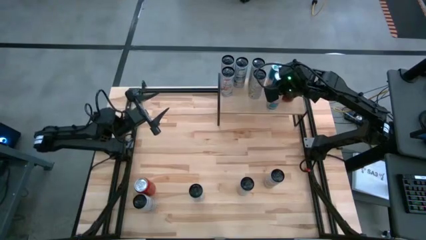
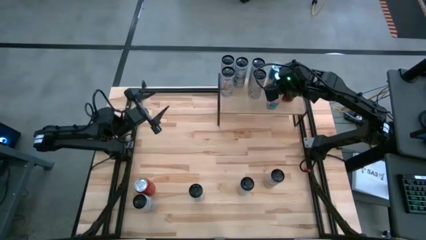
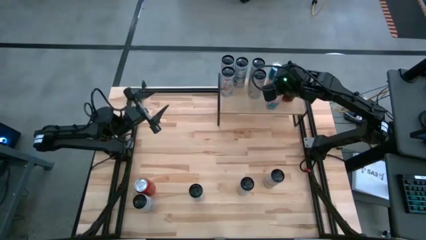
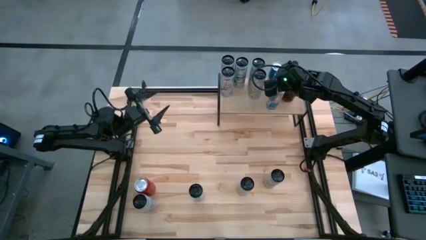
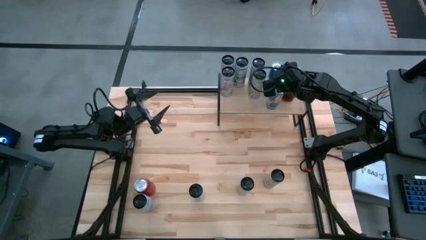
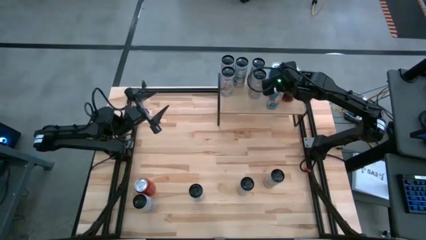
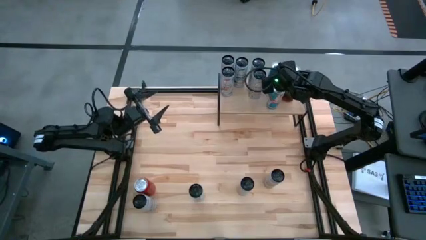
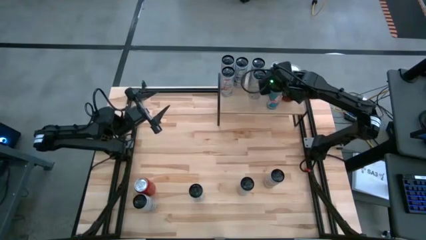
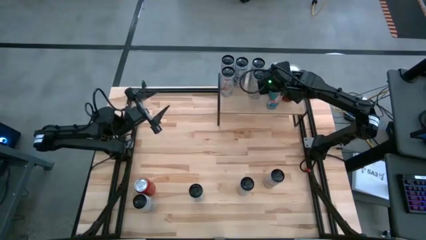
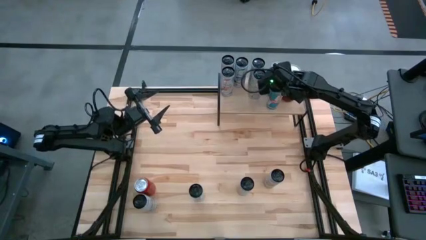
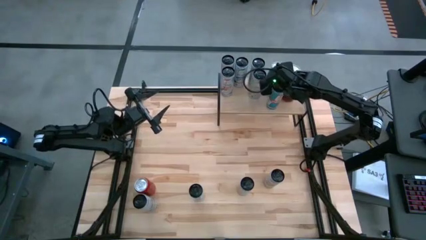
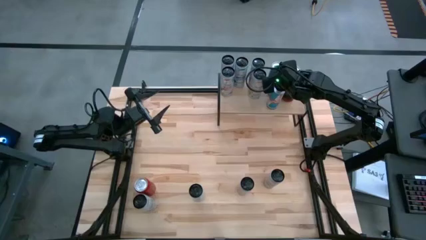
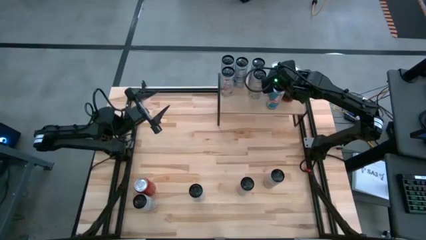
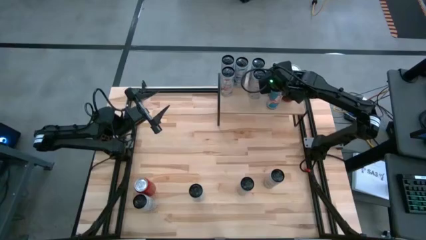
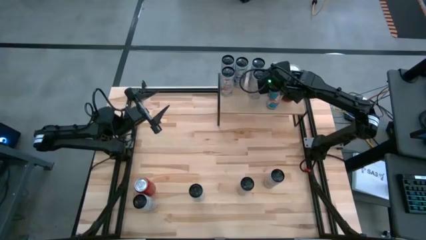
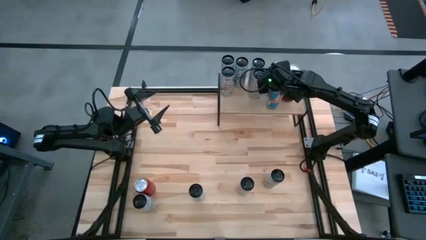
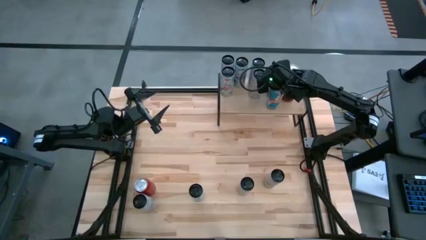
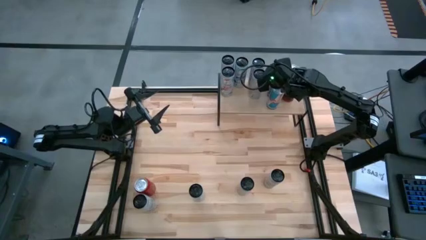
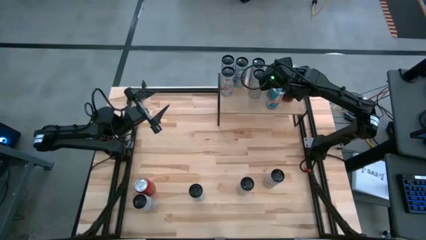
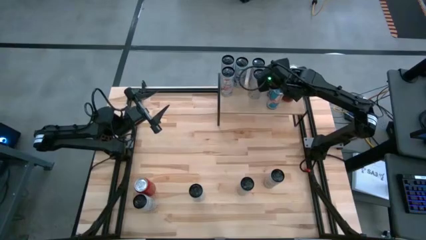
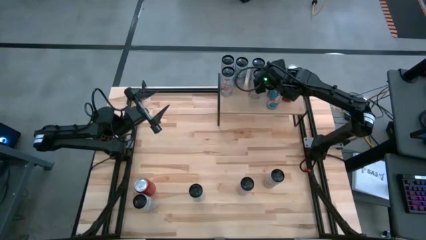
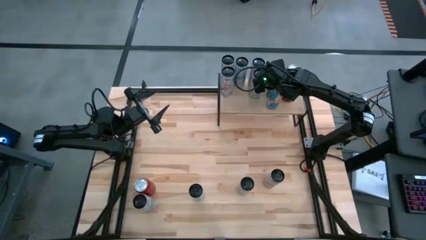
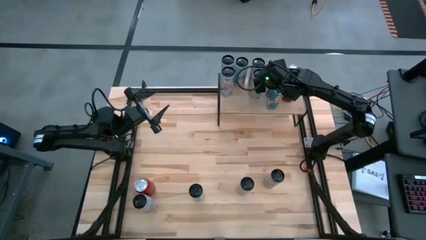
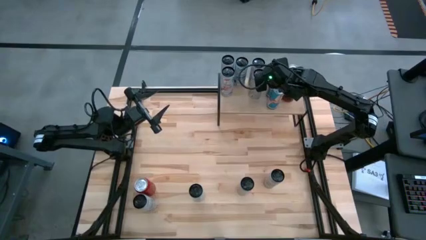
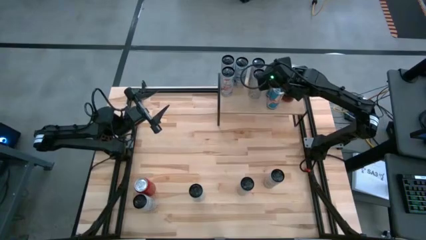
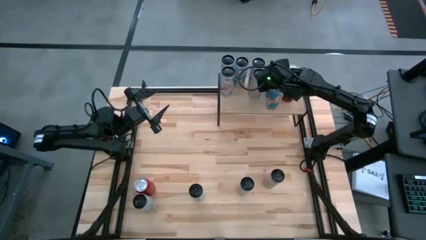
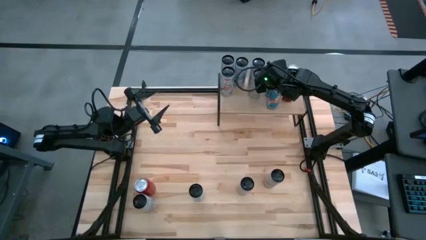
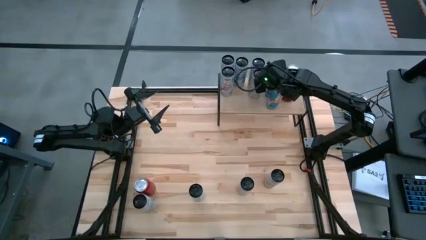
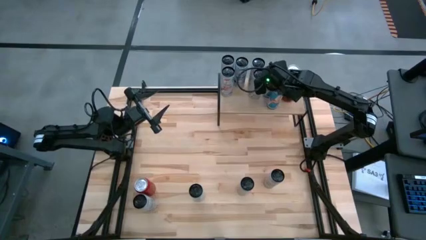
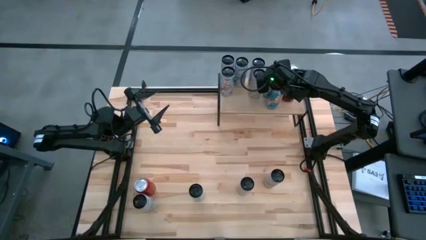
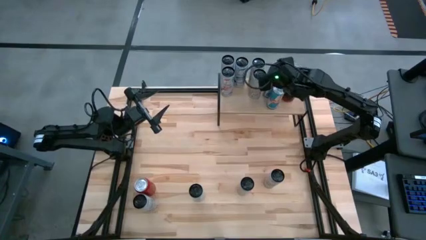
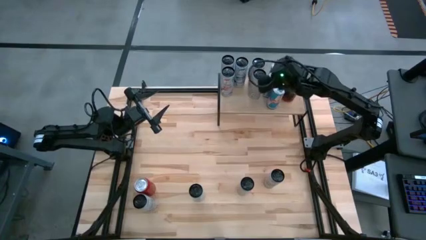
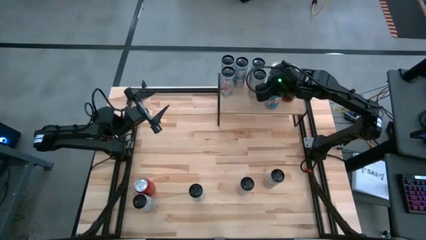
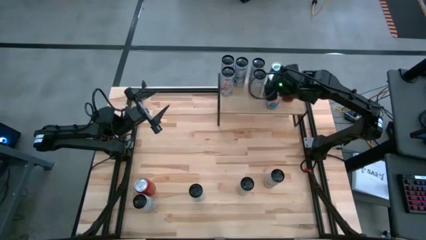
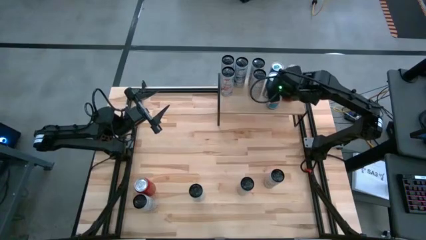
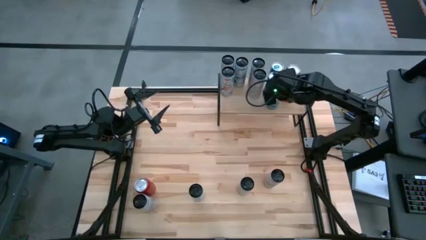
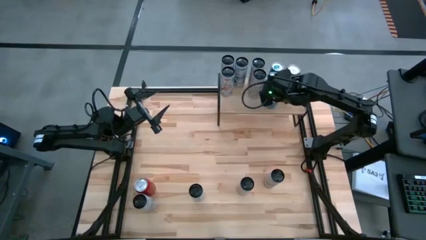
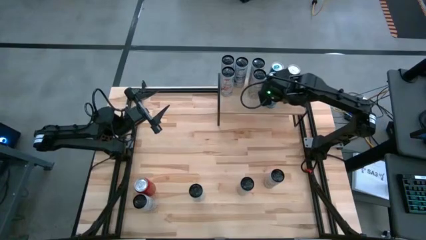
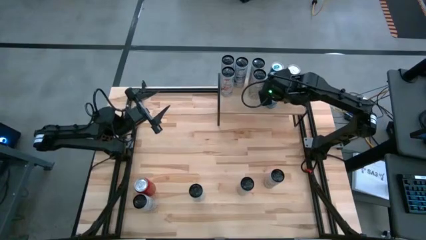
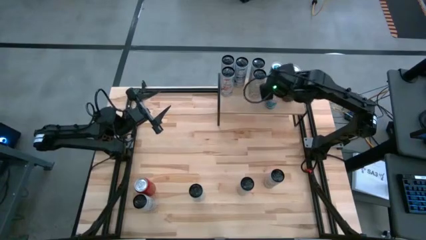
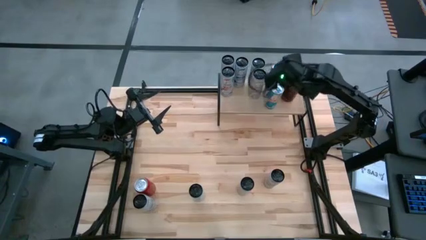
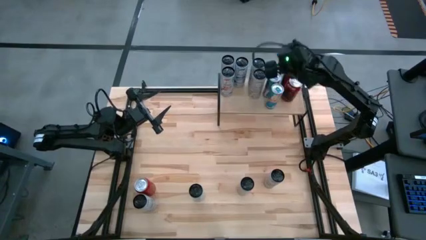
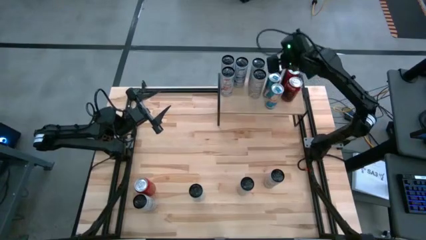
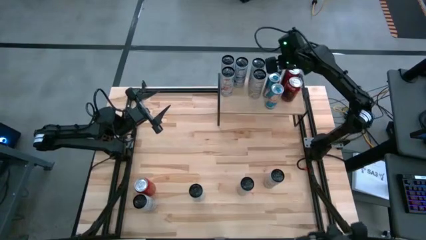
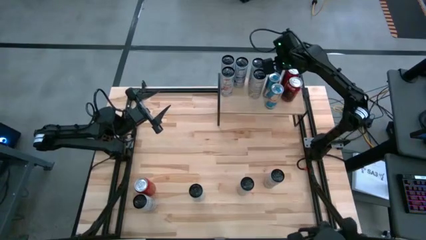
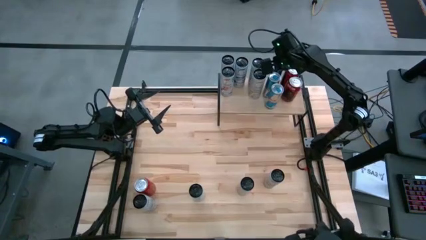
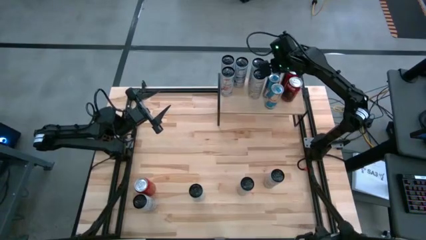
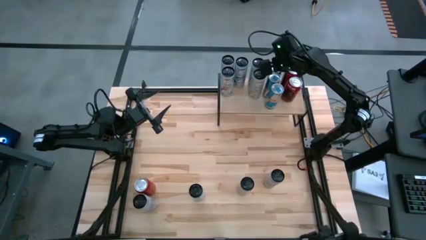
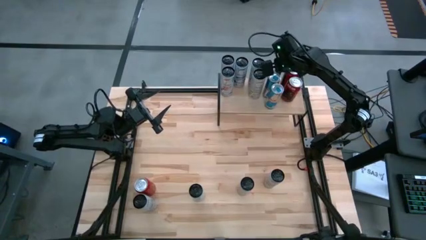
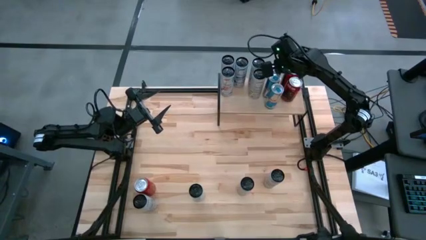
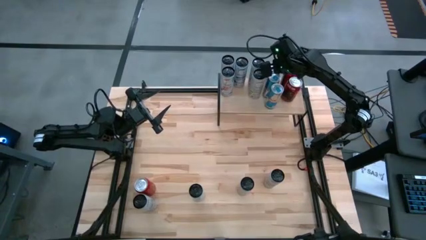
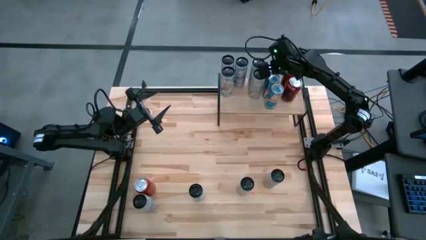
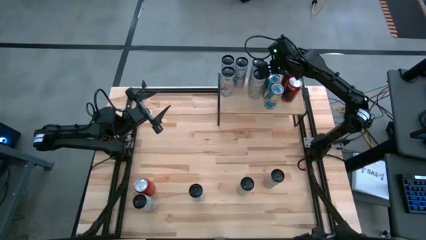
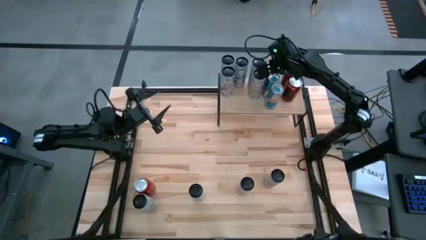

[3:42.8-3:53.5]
Task: Place canned beverage on shelf
Adjust the blue soda cans on the shelf

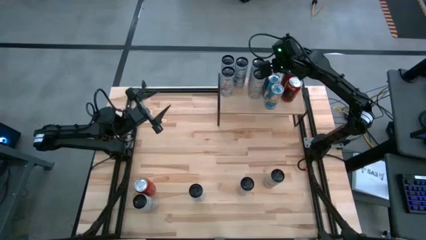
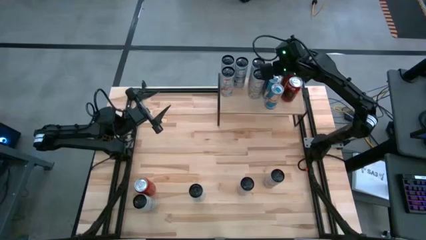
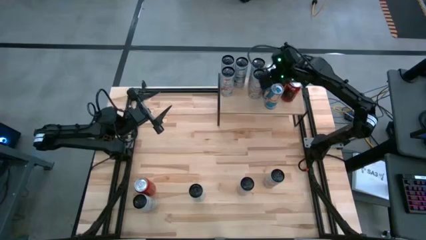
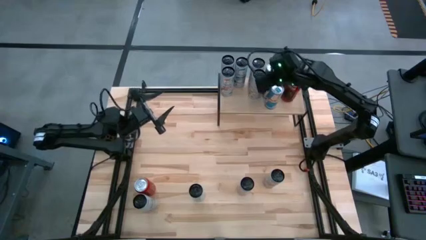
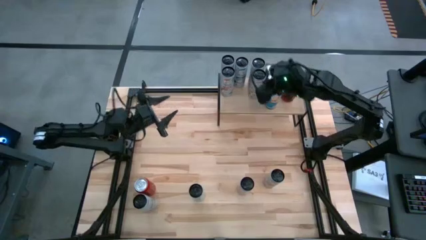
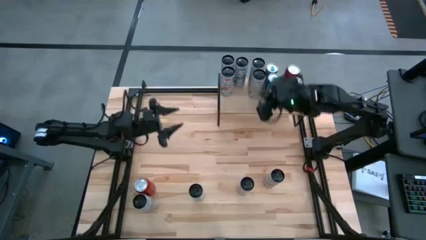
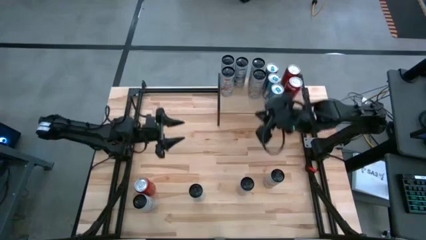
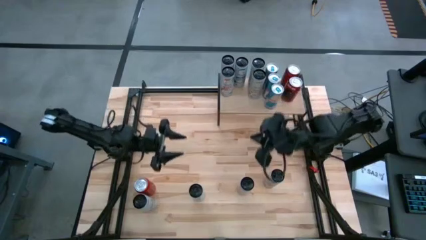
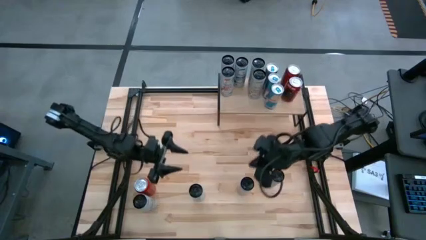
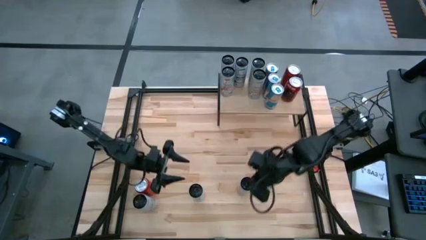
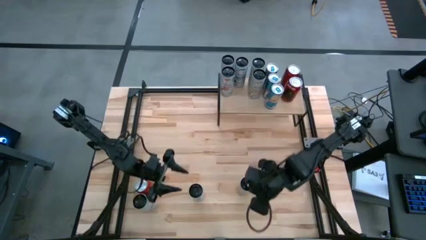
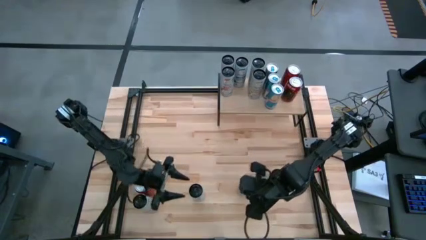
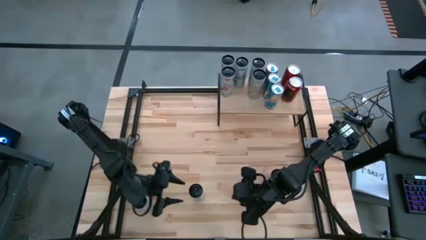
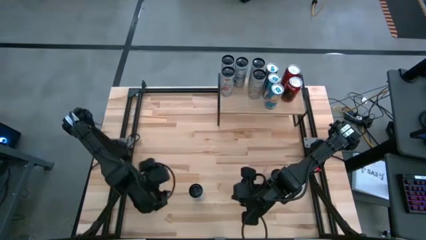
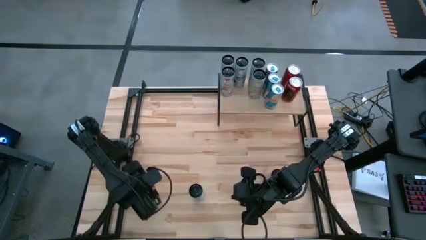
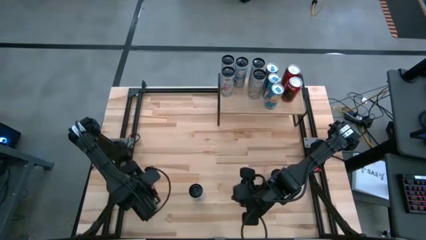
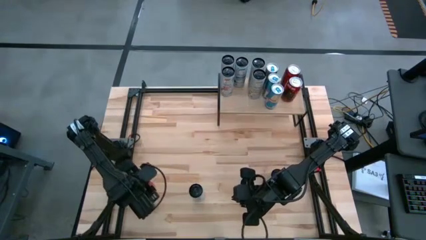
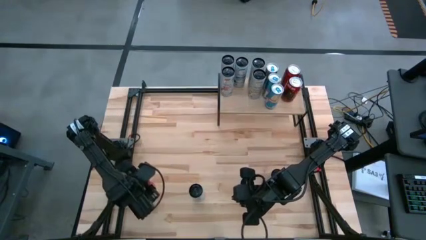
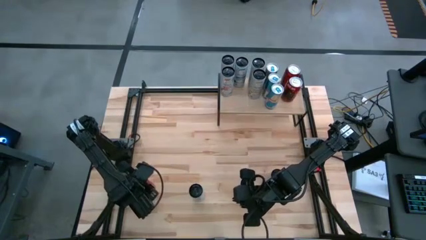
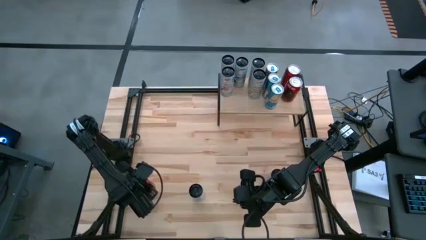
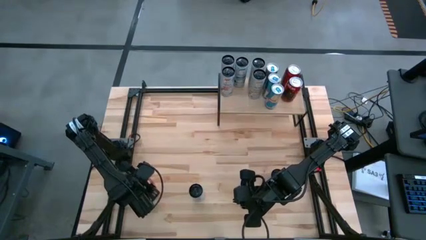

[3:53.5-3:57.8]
Put the red black soda can on the shelf aligned with the red white soda cans

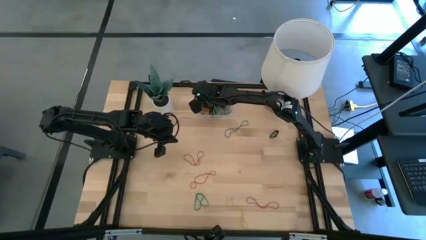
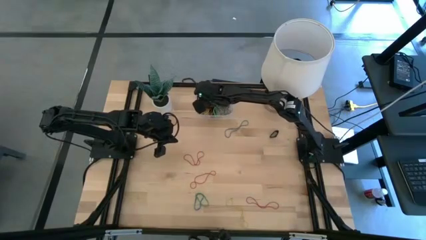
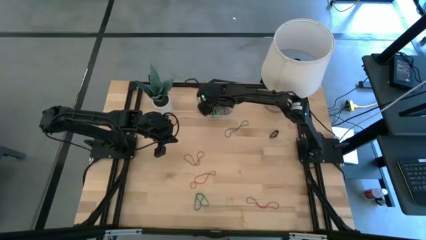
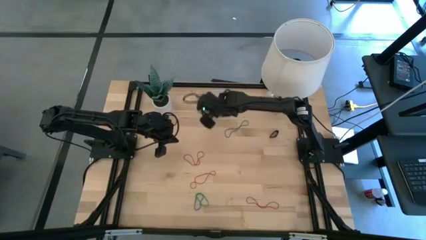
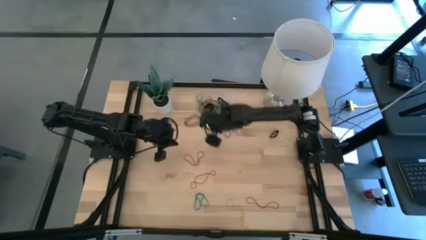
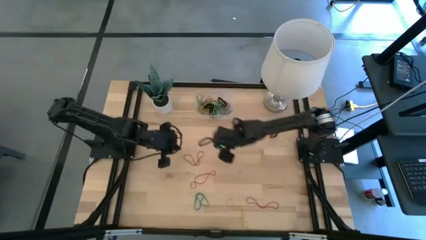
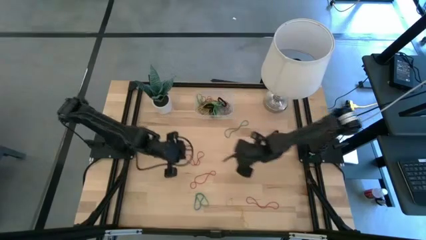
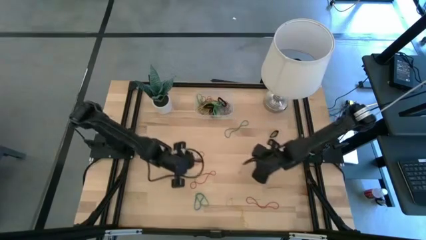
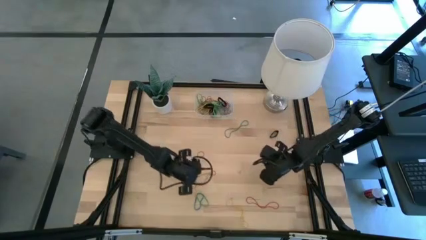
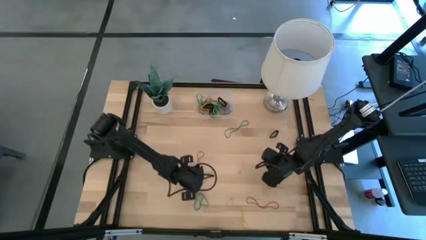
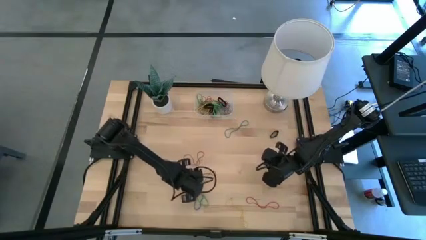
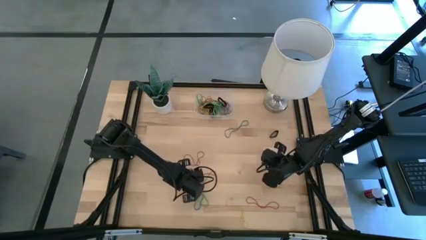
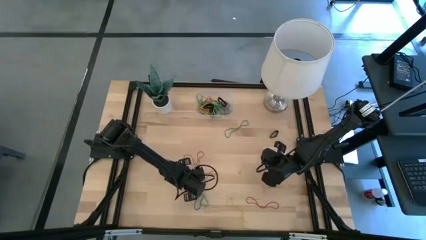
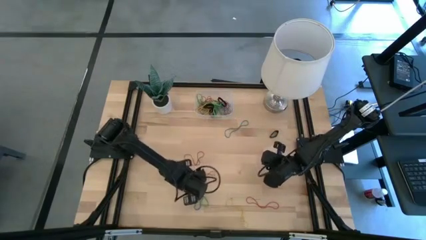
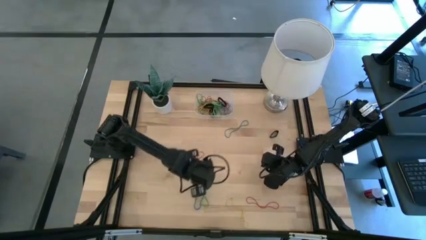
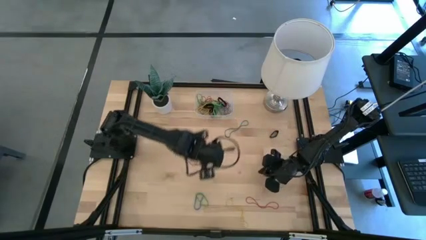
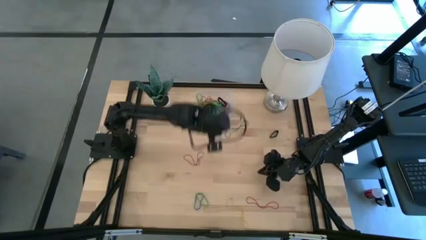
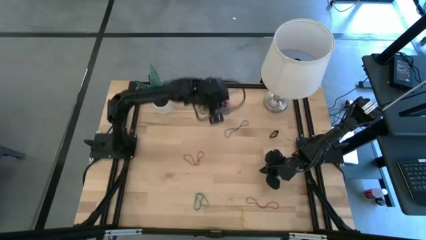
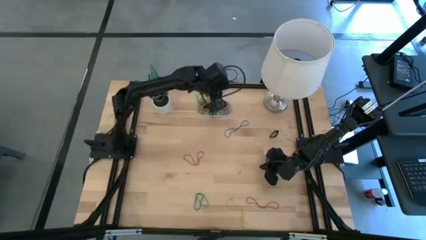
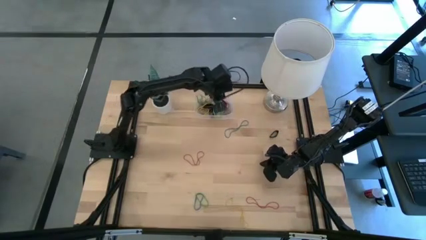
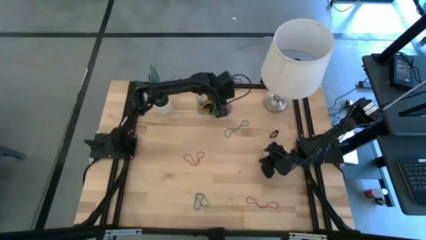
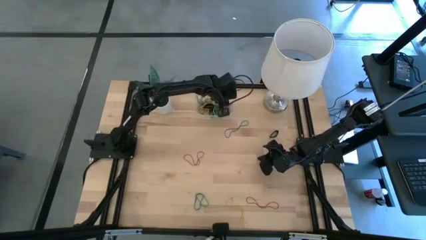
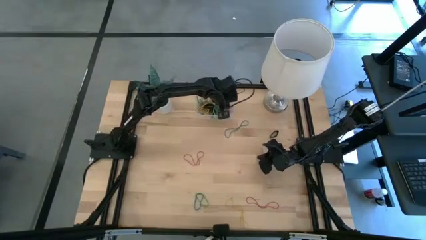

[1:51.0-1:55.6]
Task: Pick and place rubber bands into bin
Put the red rubber band into the transparent bin
